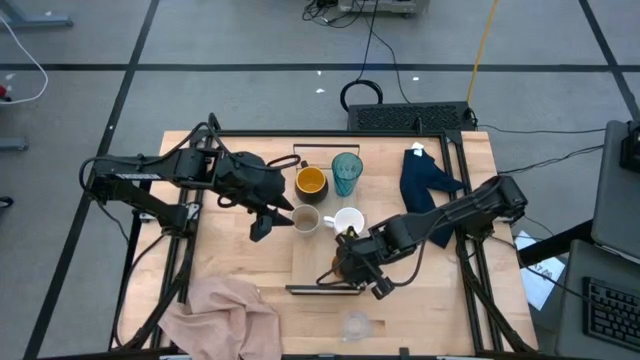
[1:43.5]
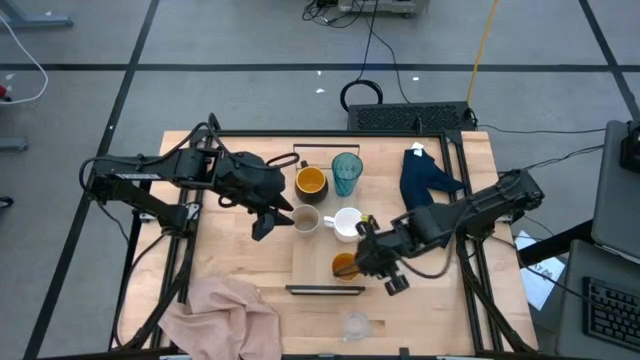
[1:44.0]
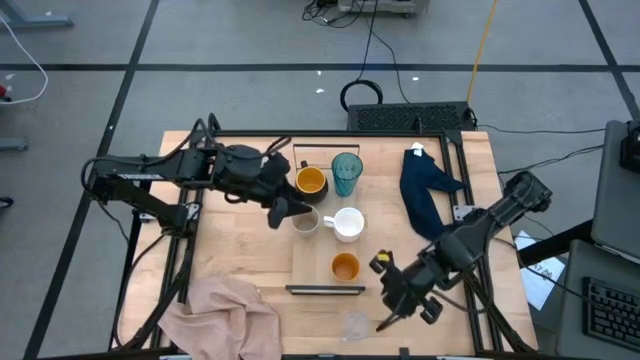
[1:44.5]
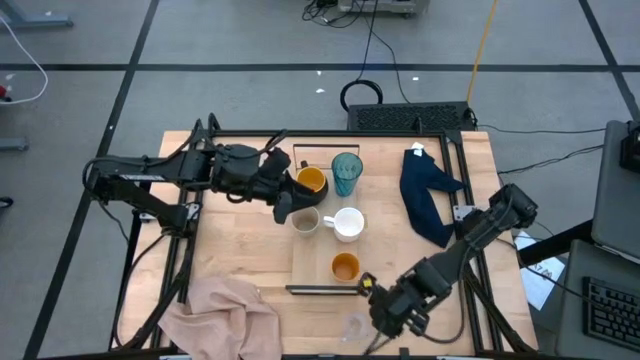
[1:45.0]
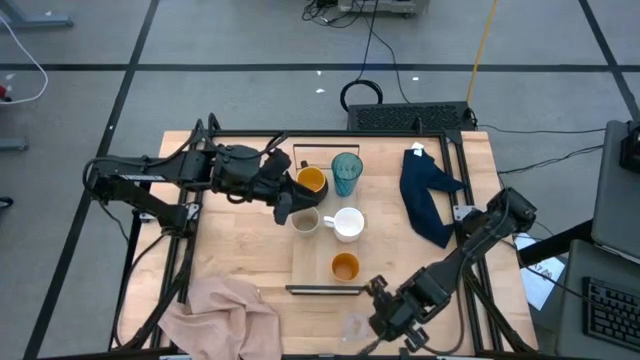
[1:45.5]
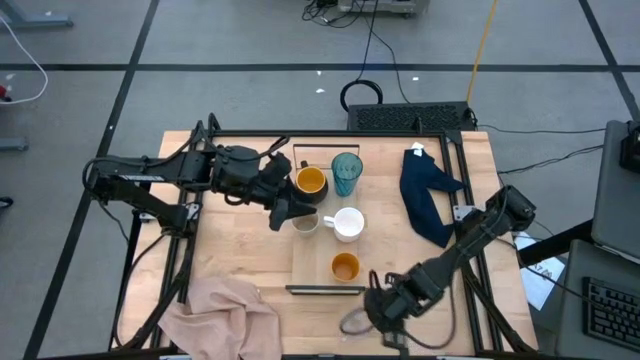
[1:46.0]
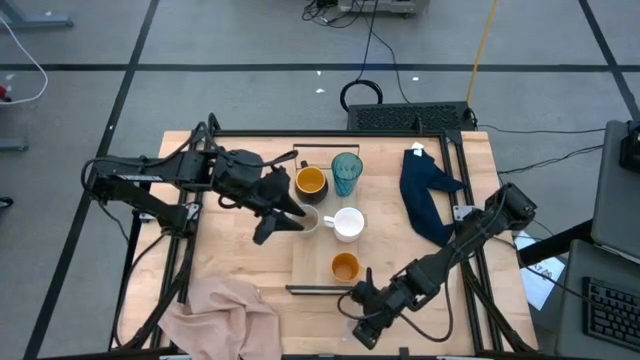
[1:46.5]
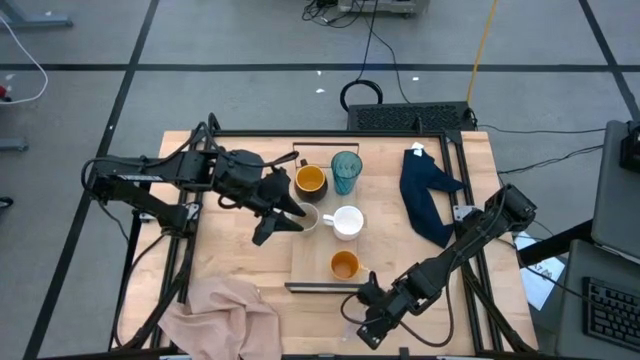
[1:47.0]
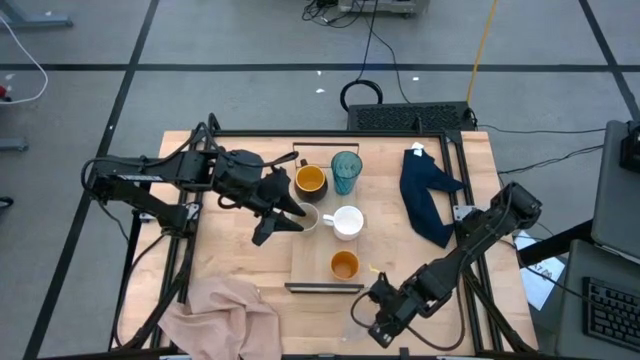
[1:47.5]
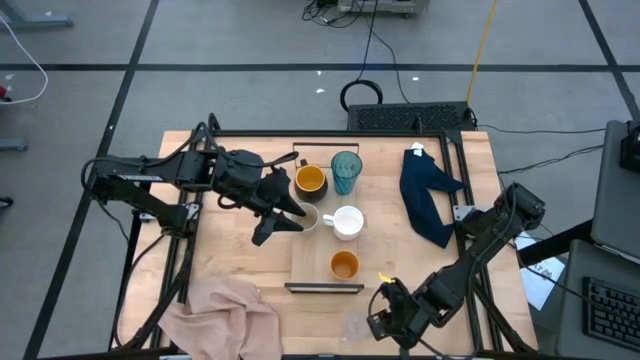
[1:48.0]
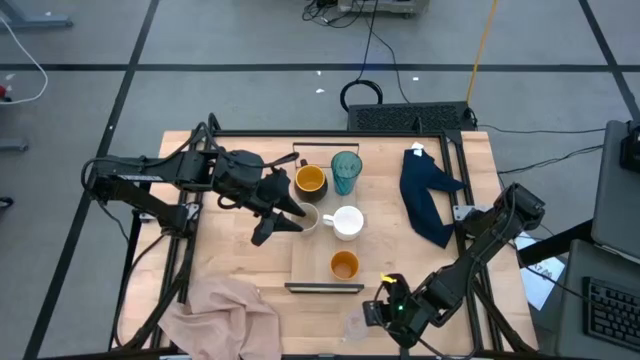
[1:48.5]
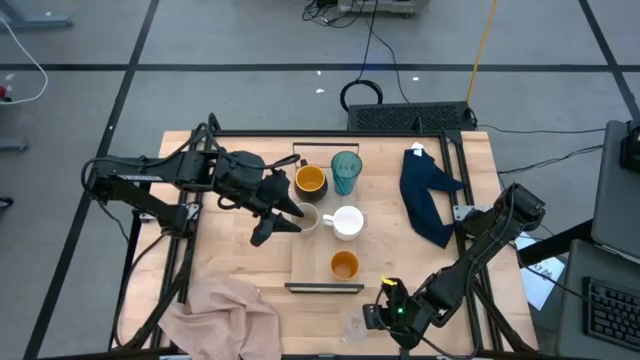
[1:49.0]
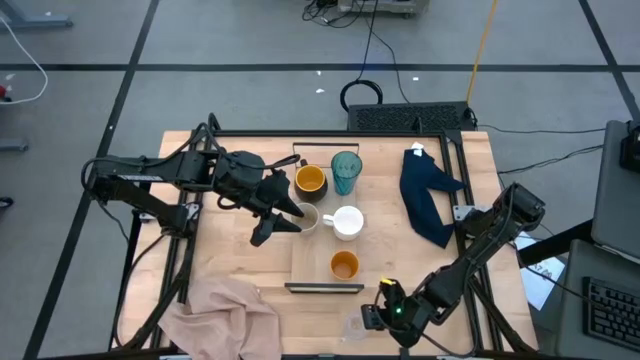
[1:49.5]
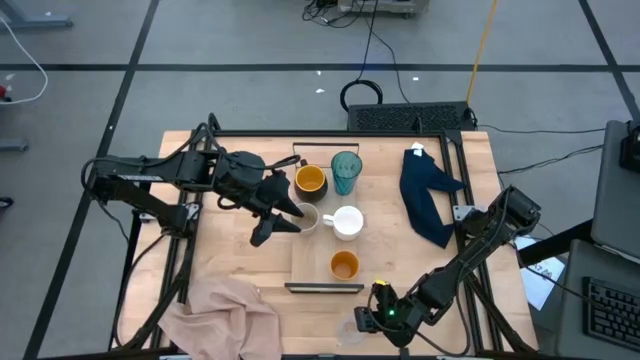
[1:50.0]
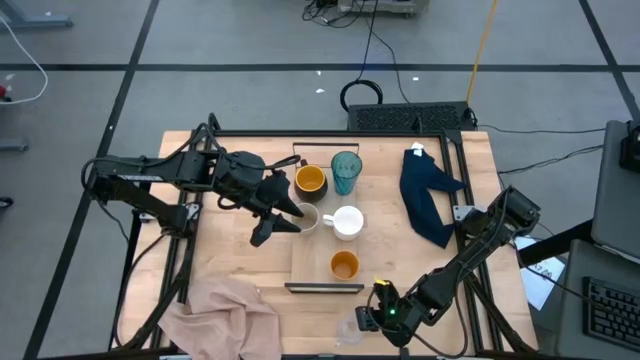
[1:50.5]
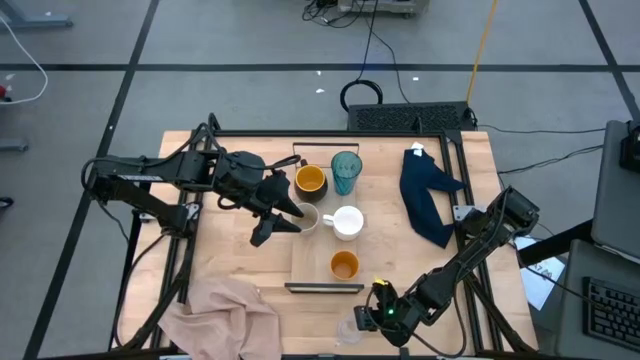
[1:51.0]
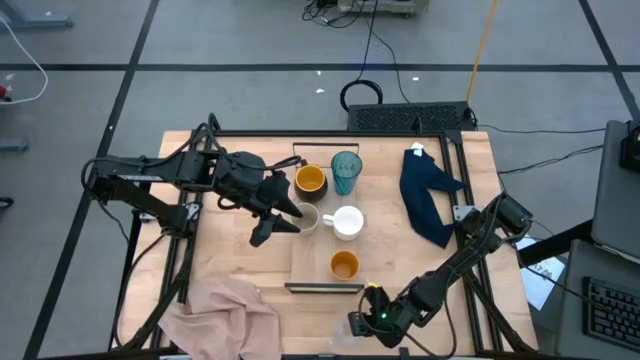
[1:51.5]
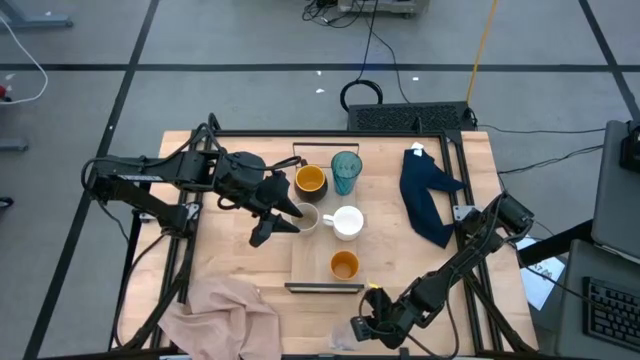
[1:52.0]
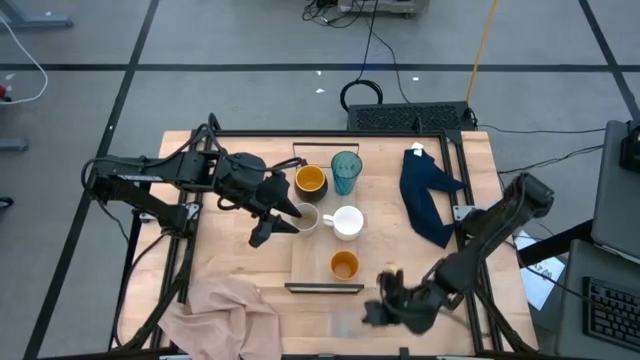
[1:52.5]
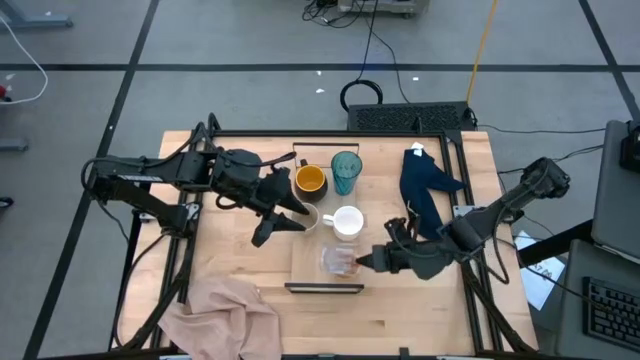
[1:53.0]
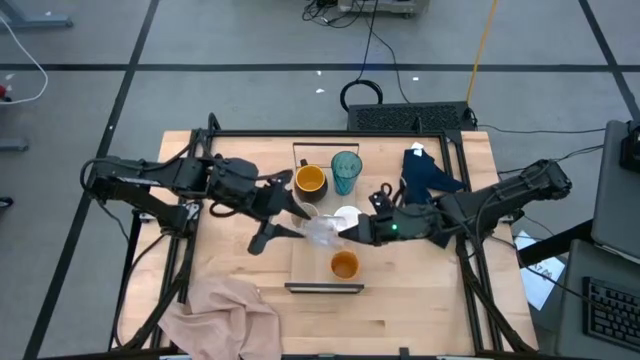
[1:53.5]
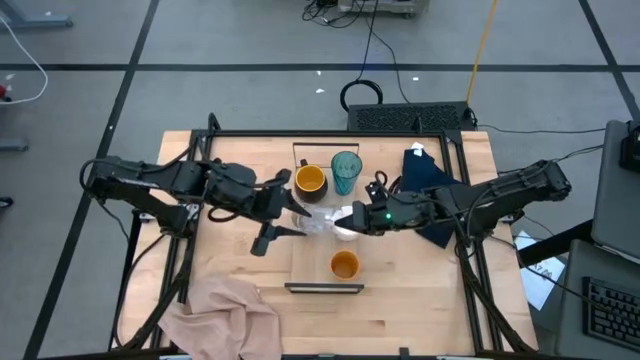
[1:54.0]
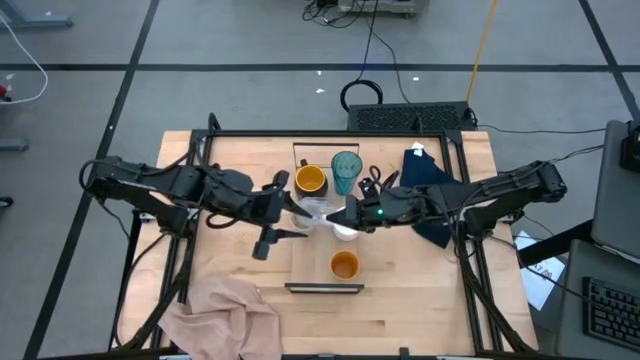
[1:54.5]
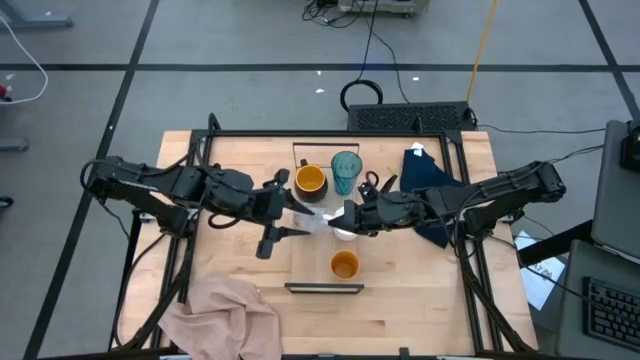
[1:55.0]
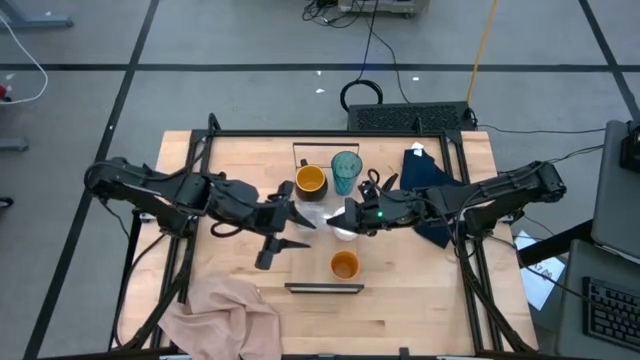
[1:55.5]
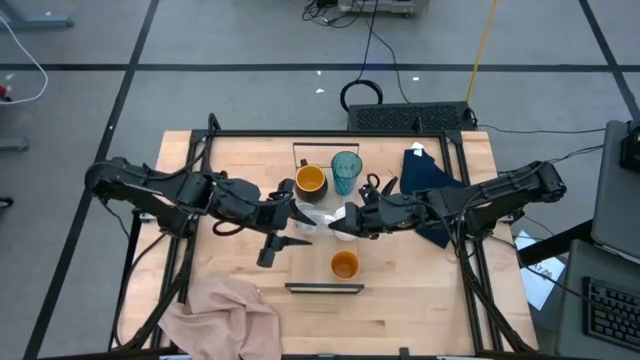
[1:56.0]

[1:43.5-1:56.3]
Task: Stack small to large cups/mugs on shelf
Put the transparent mug on the shelf

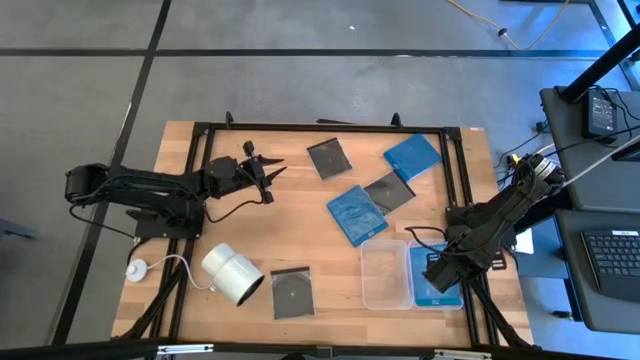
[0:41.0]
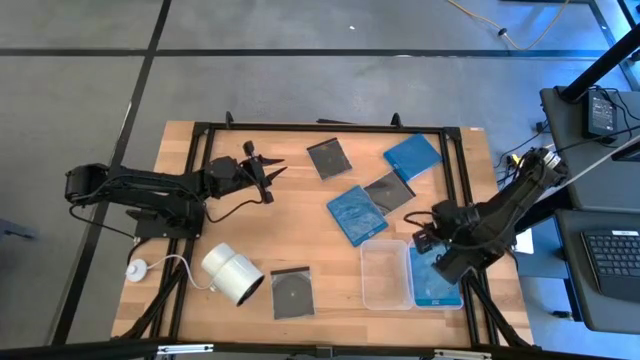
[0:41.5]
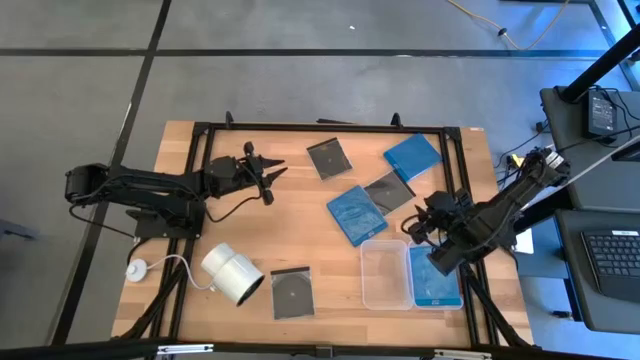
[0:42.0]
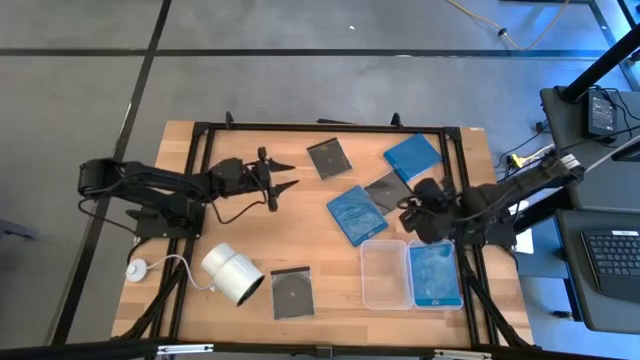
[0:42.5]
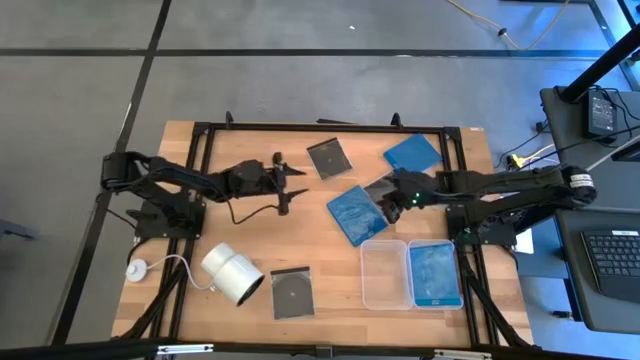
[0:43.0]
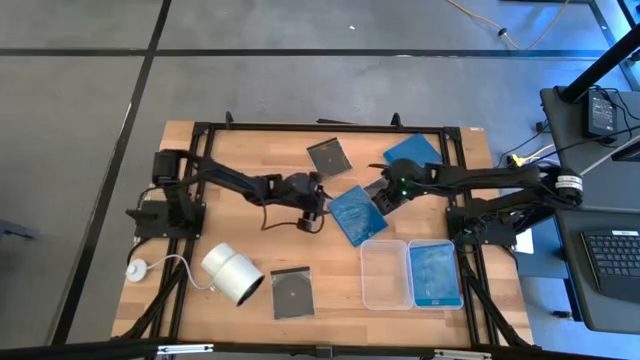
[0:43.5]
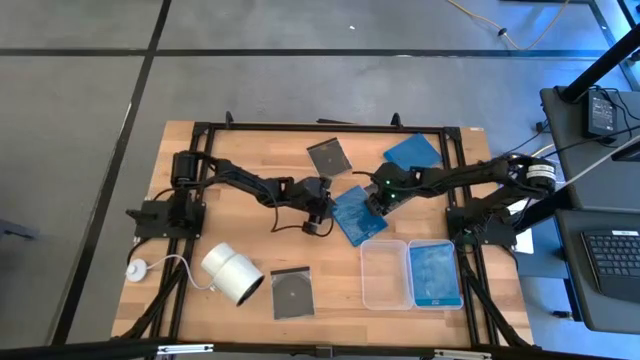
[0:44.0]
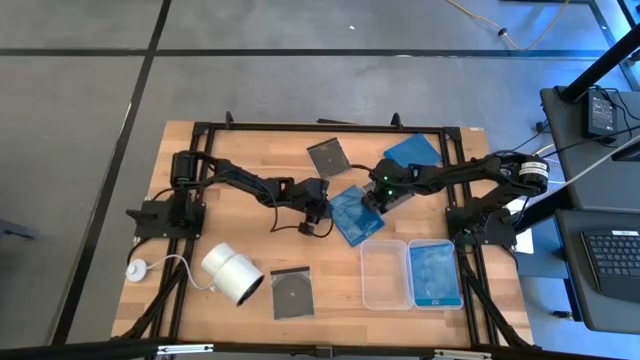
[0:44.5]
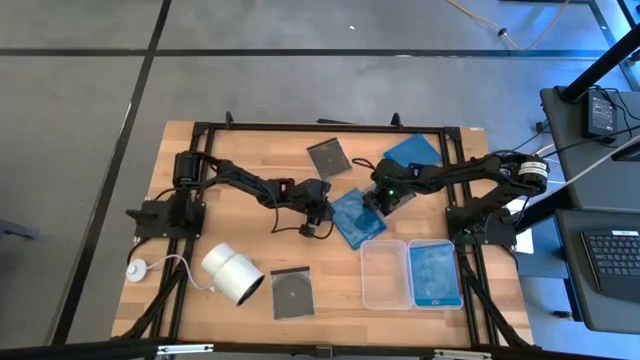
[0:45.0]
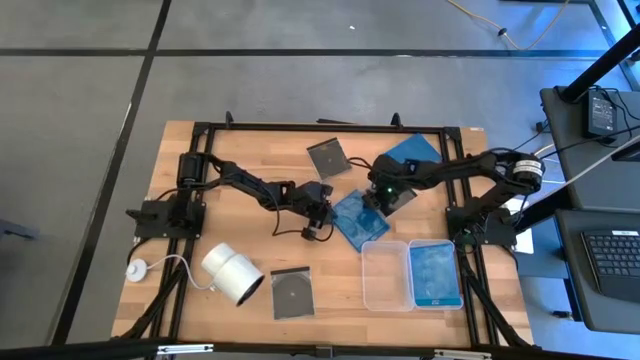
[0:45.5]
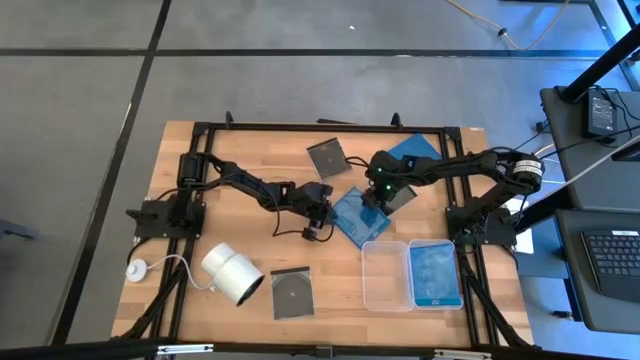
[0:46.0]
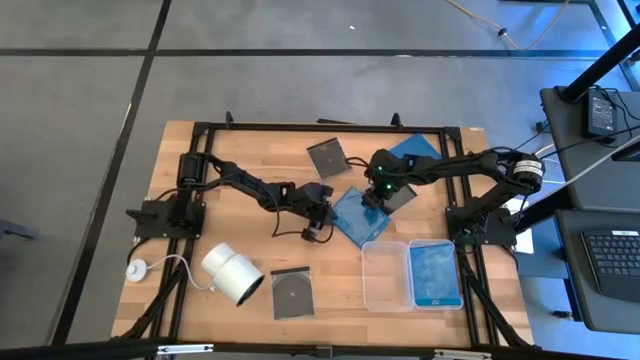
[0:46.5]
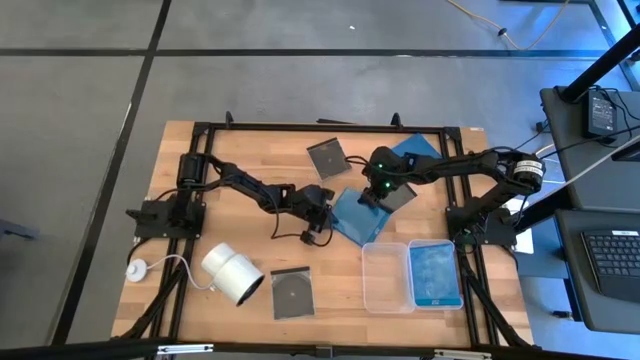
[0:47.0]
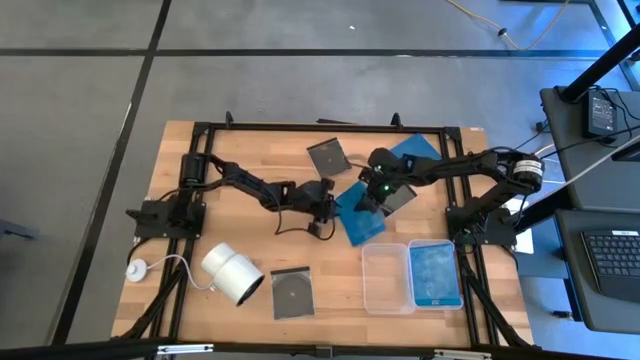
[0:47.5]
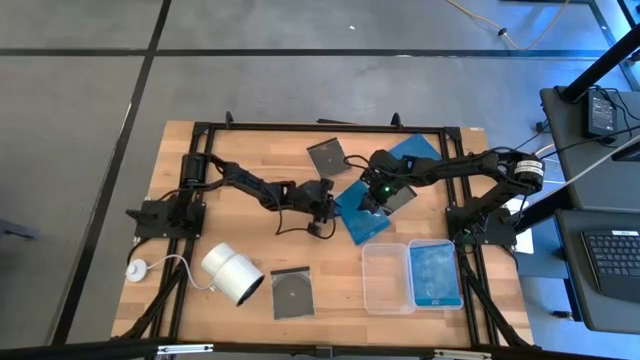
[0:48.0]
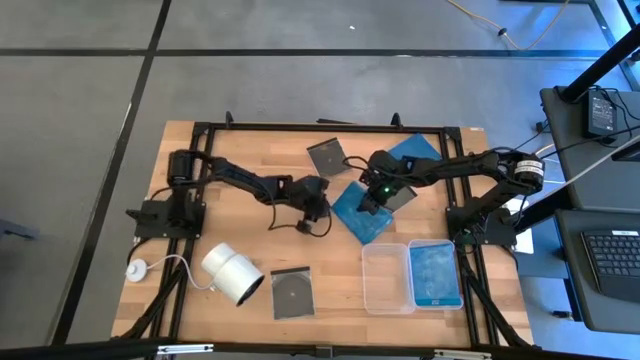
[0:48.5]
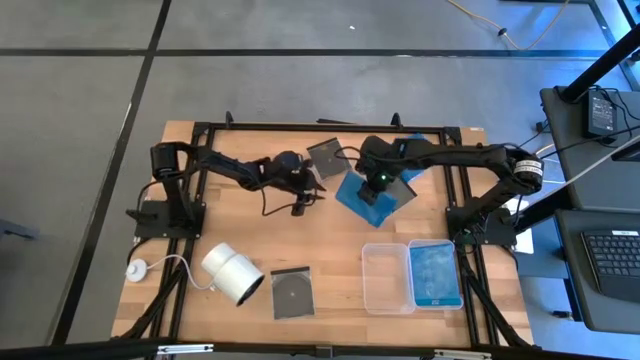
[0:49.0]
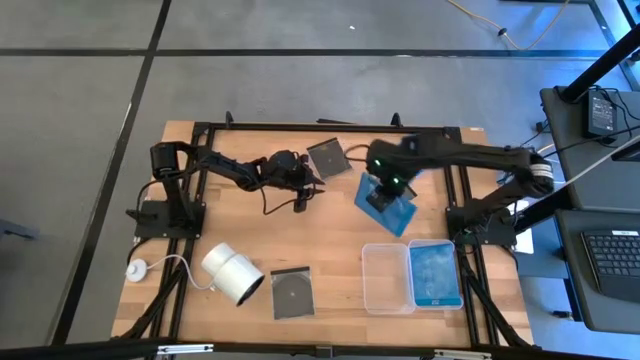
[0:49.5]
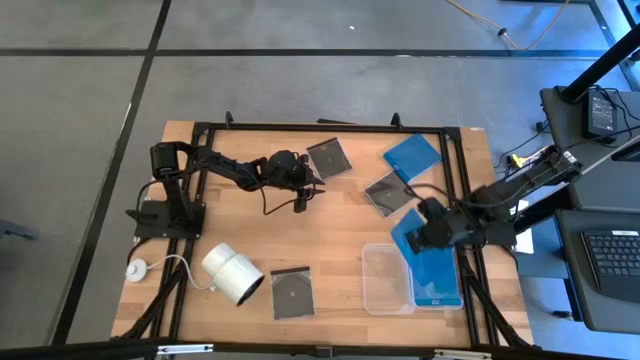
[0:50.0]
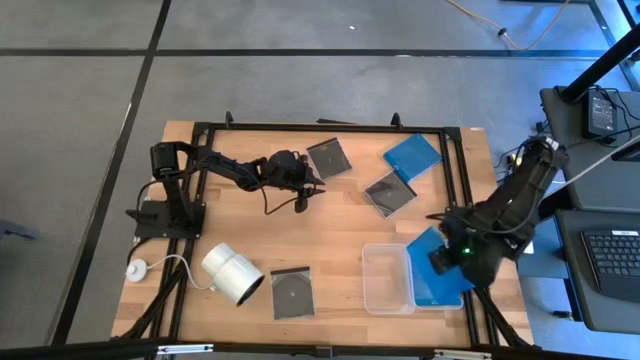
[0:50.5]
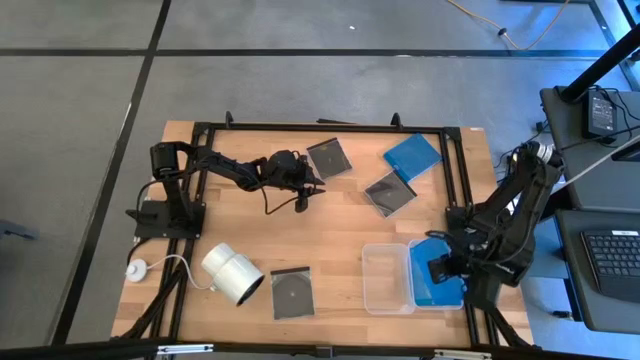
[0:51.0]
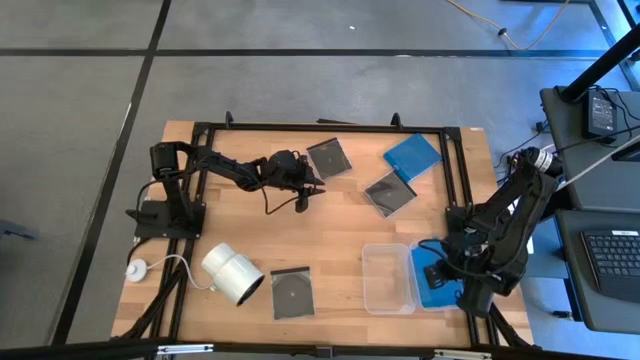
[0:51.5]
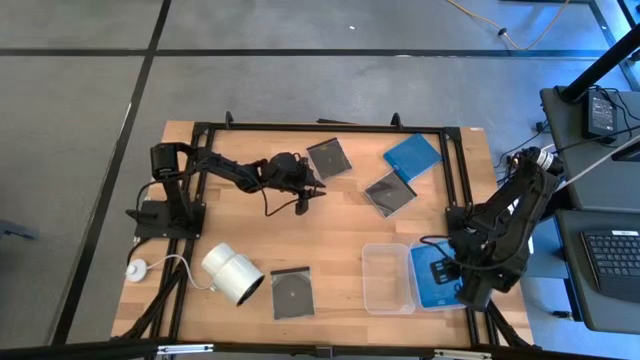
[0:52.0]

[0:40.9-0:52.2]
Task: Pick & place jewel cases by type
Put the bottom blue CD case into the right transparent bin
